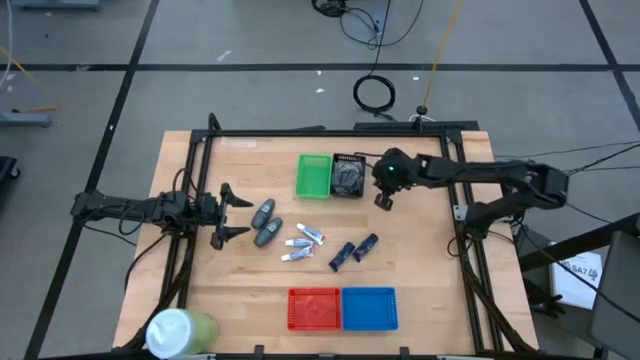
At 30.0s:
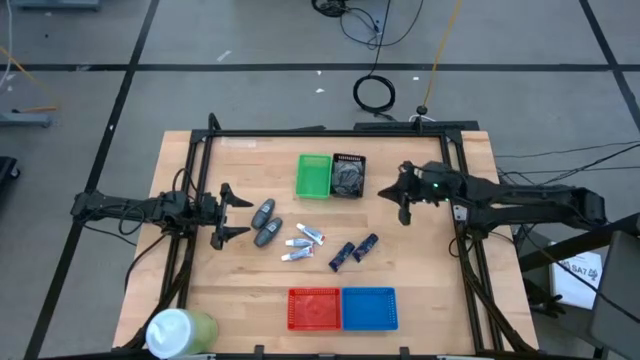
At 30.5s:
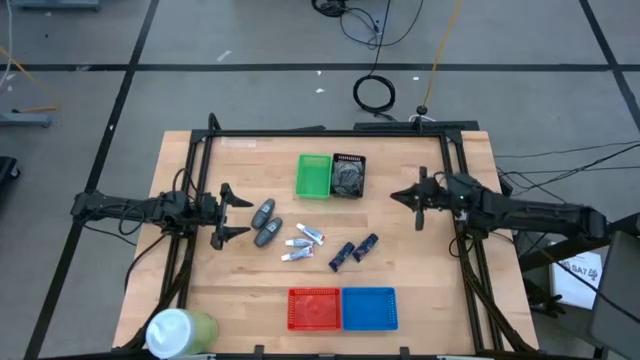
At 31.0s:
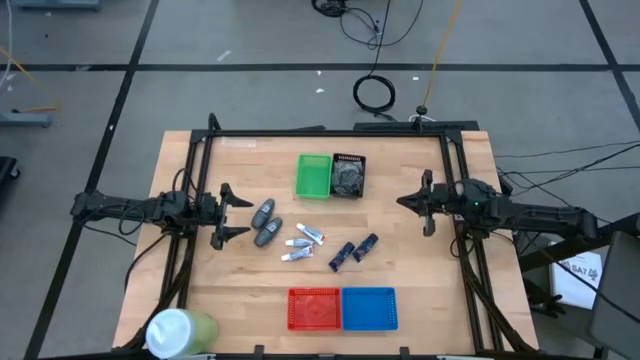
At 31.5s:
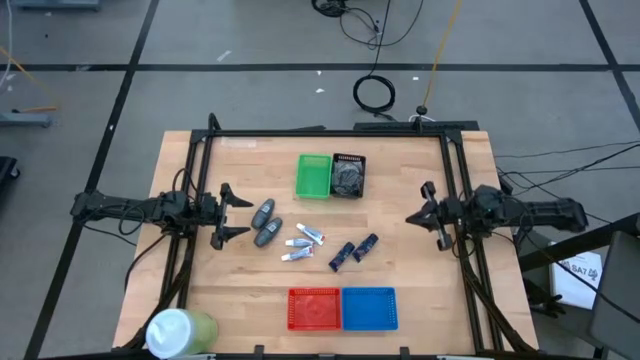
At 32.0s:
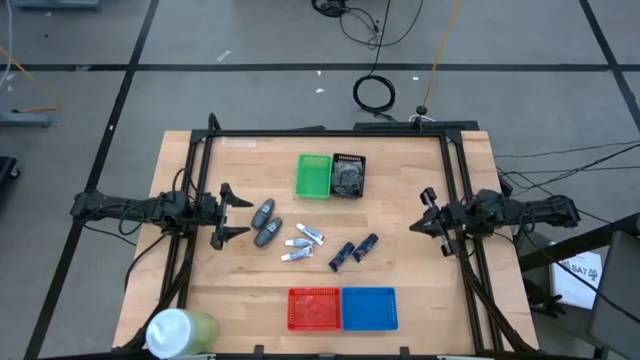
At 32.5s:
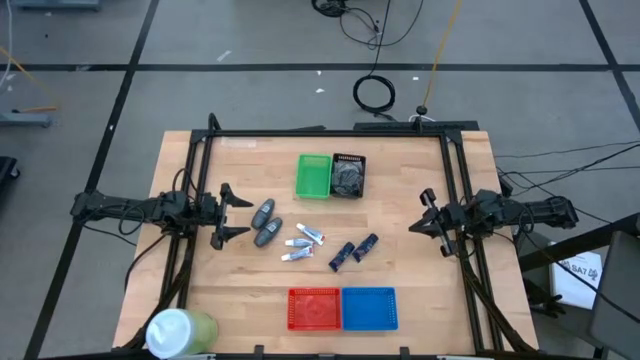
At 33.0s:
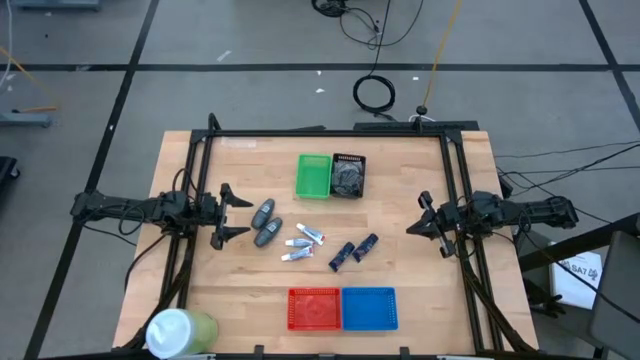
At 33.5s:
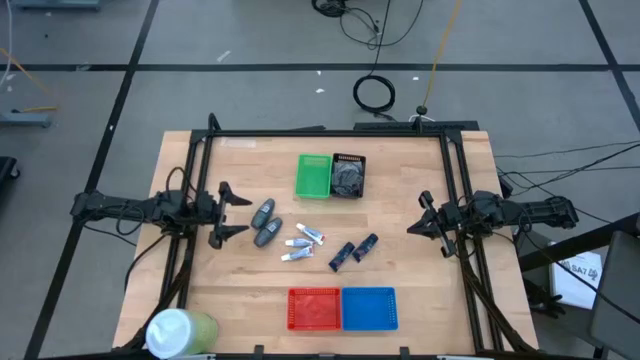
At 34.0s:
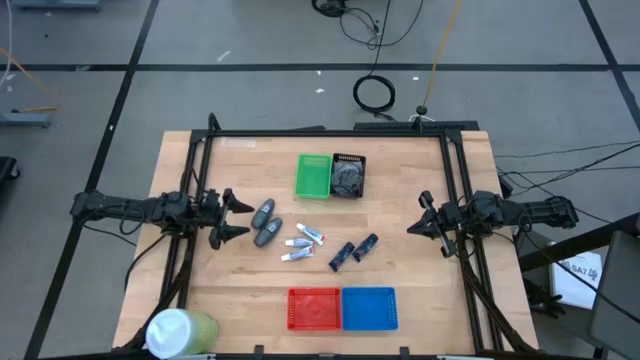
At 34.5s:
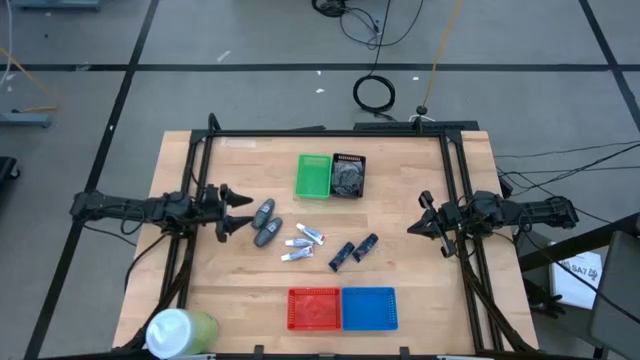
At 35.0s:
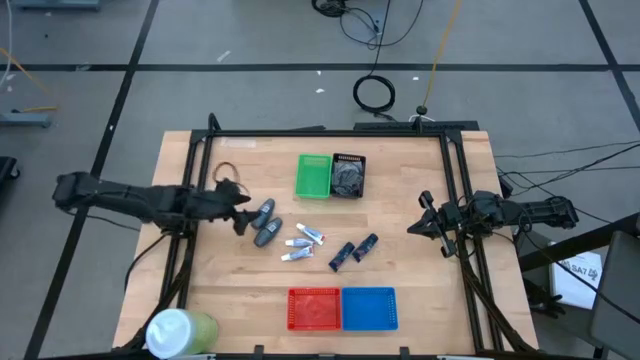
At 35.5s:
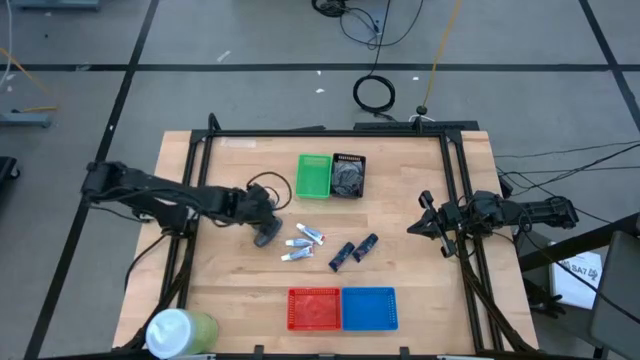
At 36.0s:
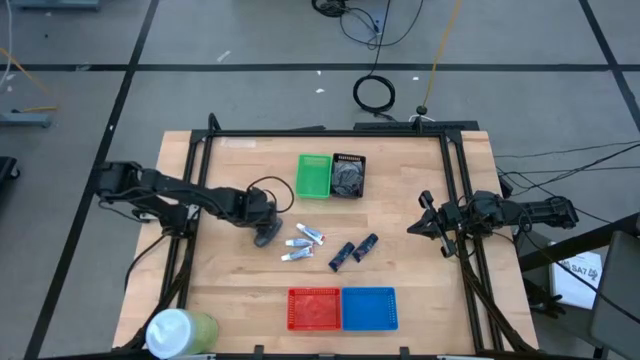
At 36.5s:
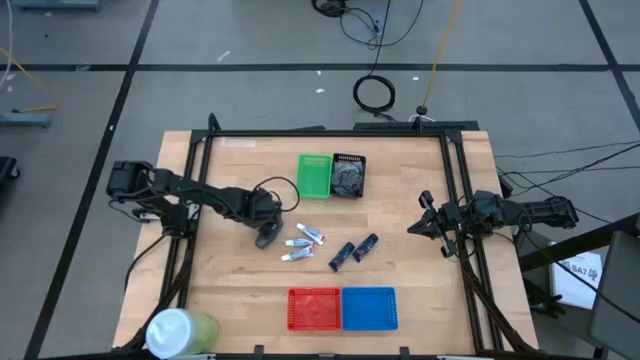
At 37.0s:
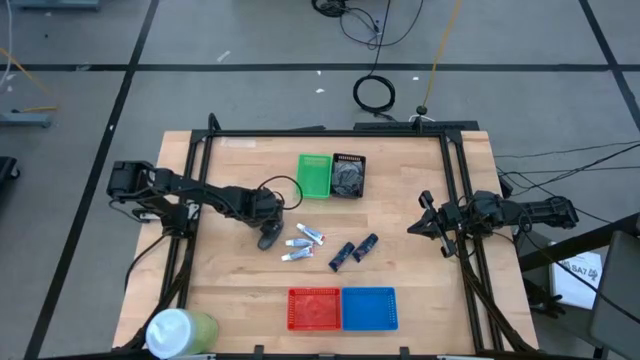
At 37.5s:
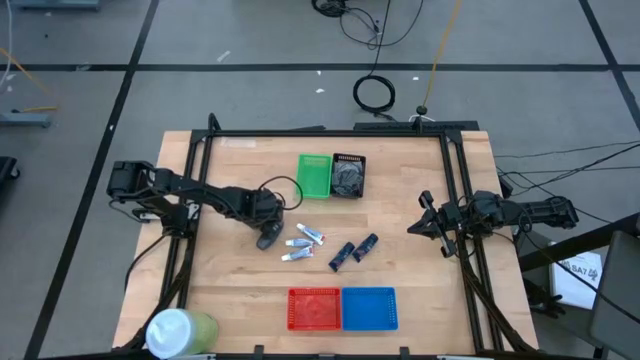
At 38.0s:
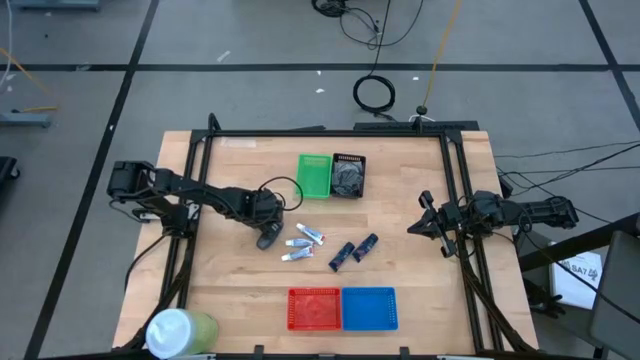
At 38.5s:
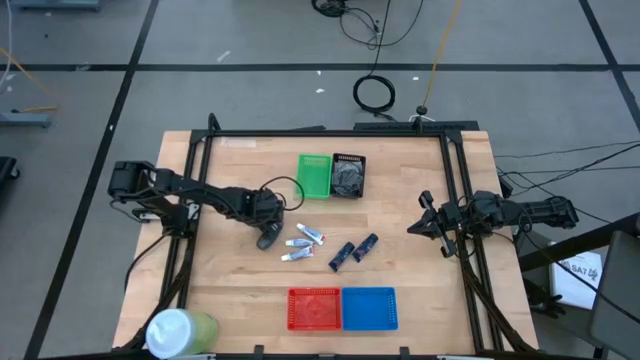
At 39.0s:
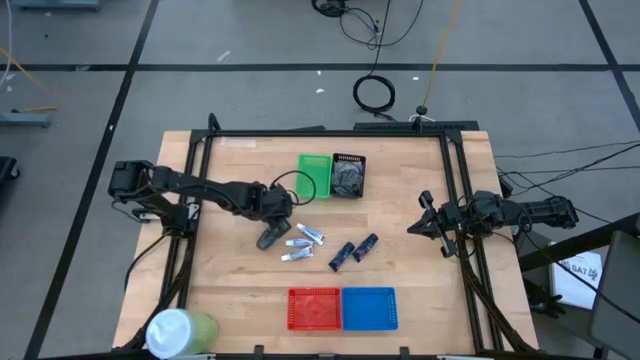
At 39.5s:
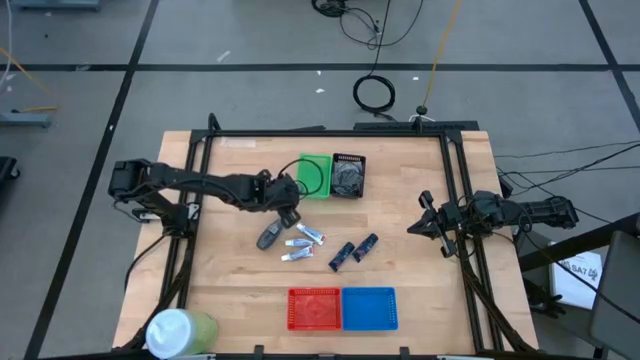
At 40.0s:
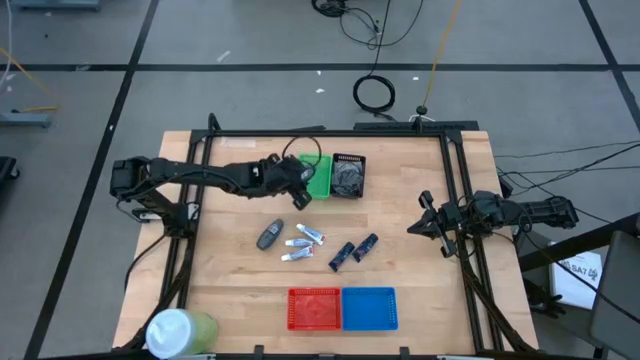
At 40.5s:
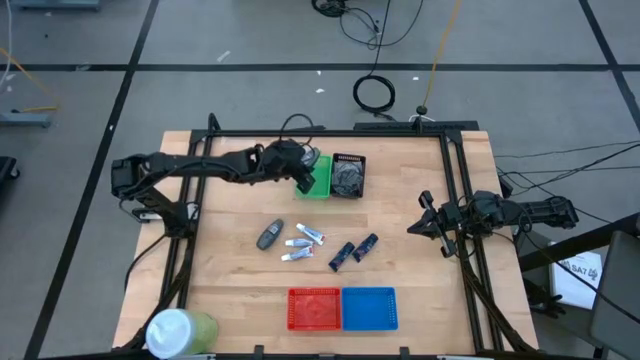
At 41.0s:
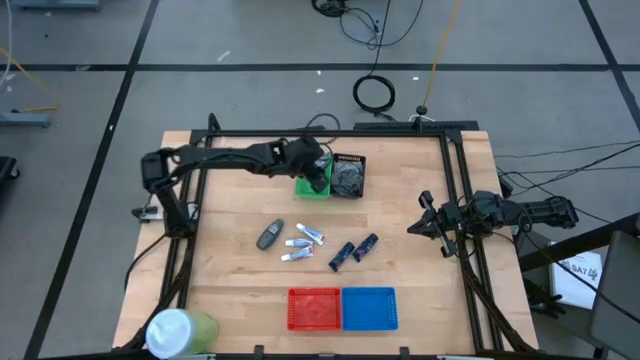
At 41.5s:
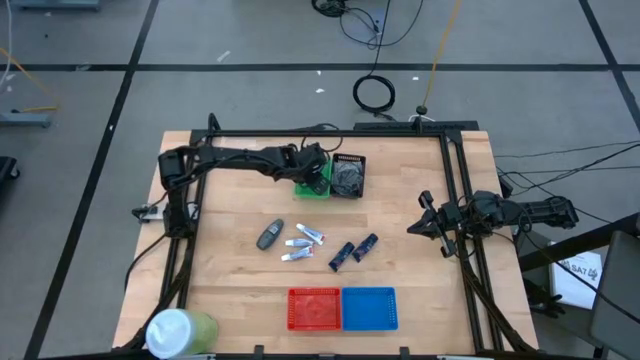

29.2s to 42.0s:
Task: Pick & Place Travel size toiletries
Put the left deodorant into the green bin

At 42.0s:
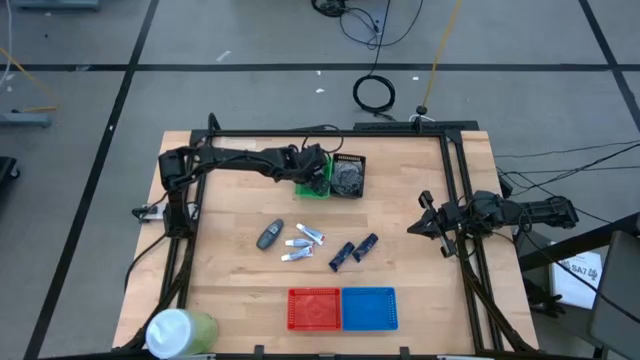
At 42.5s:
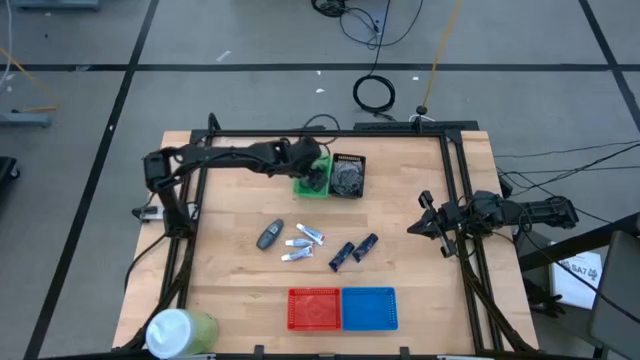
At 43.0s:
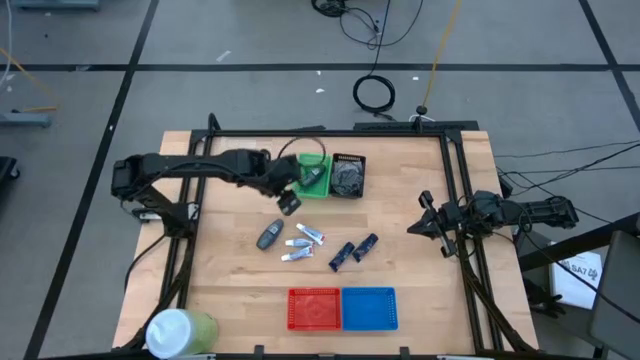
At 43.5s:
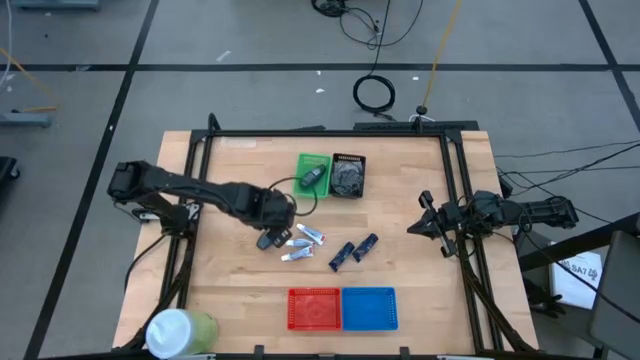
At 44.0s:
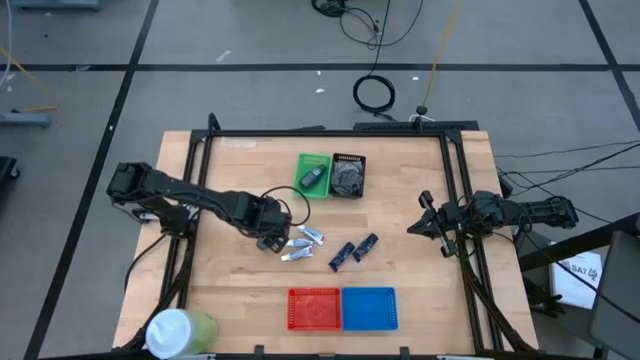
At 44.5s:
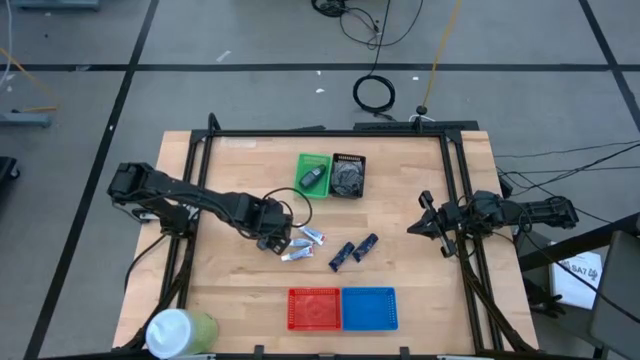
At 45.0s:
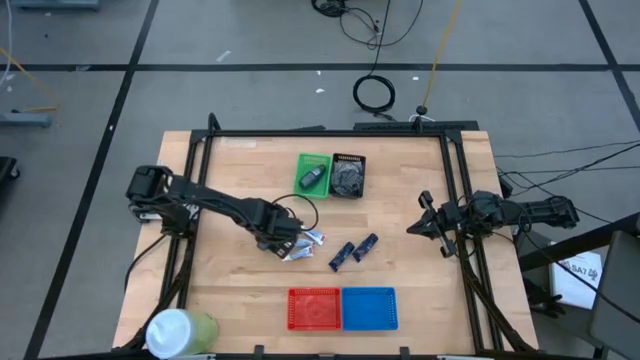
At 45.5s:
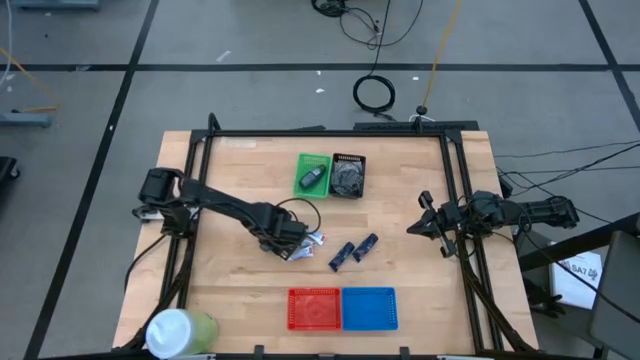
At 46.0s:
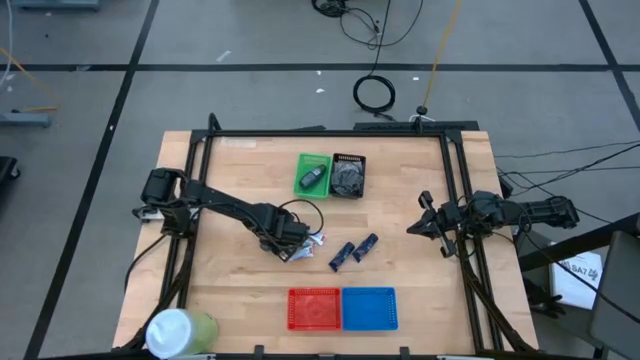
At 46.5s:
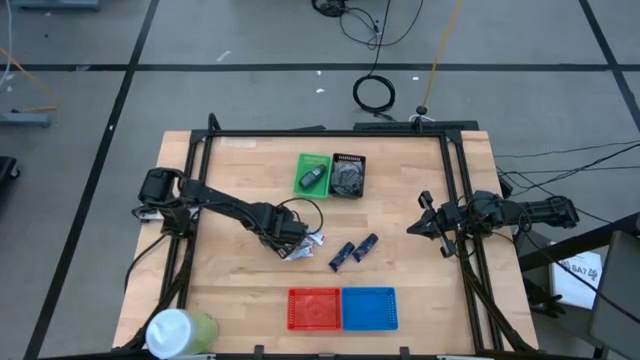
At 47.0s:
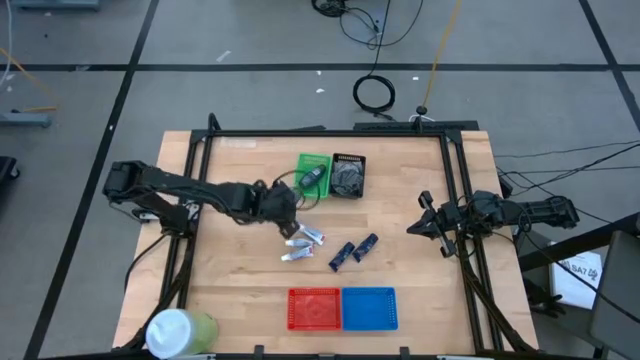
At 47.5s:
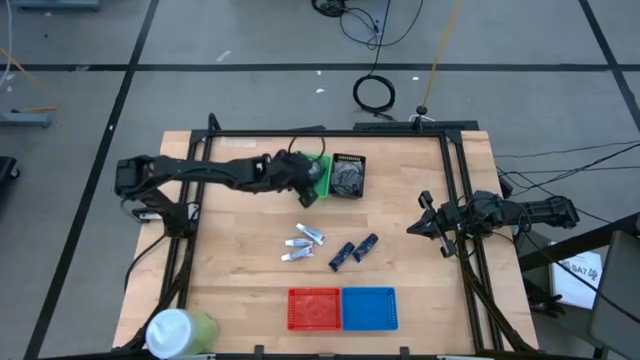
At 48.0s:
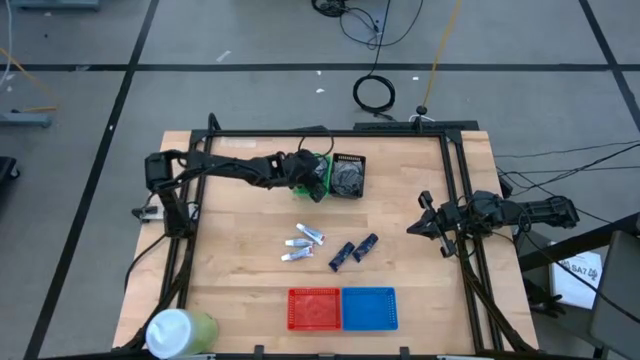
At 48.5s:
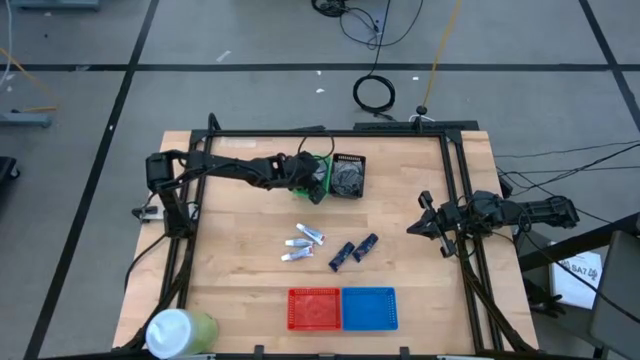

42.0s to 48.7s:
Put the deodorant into the green bin
